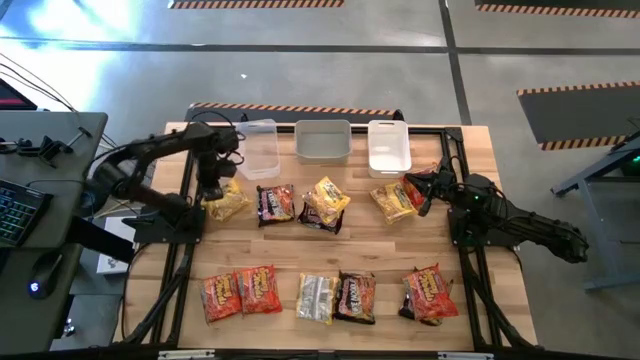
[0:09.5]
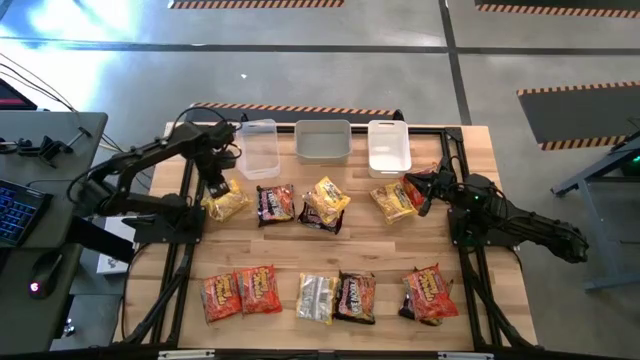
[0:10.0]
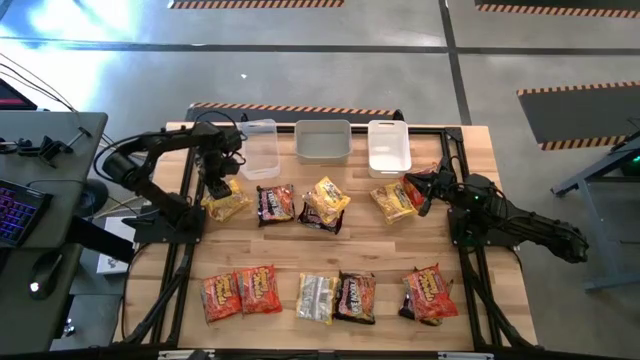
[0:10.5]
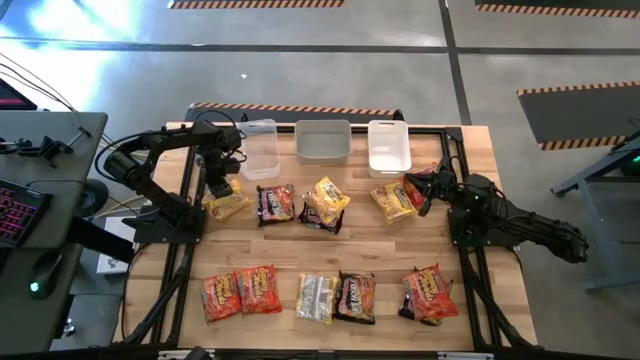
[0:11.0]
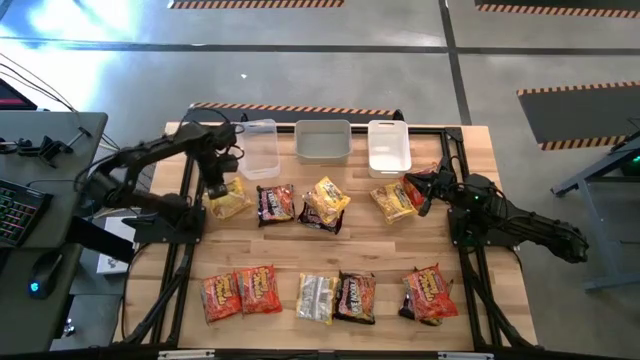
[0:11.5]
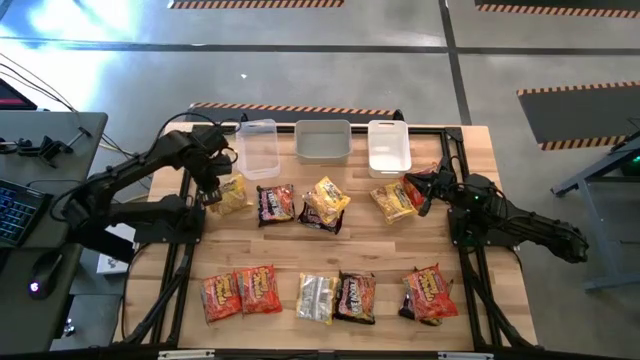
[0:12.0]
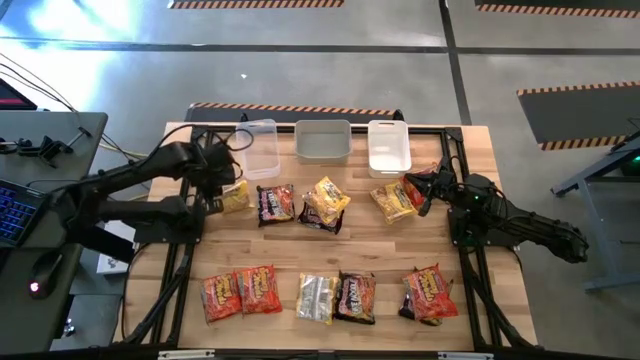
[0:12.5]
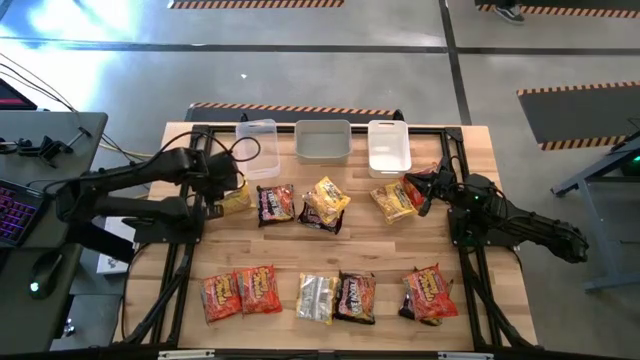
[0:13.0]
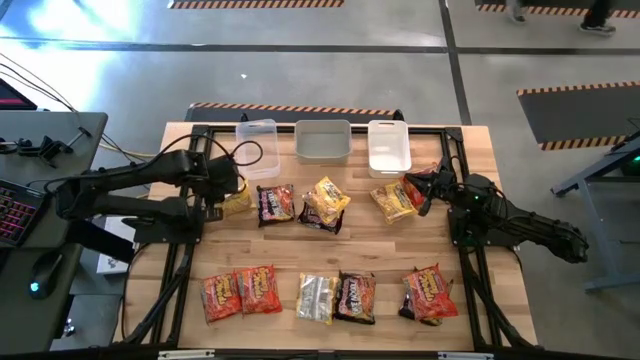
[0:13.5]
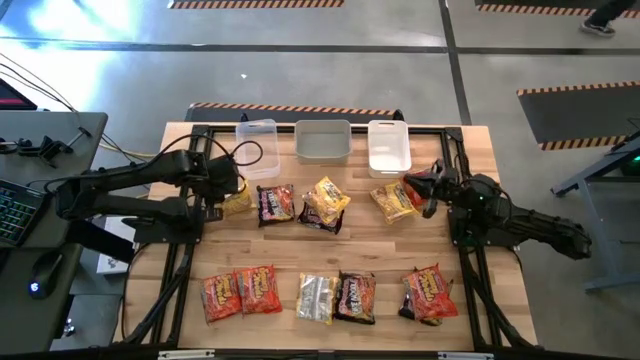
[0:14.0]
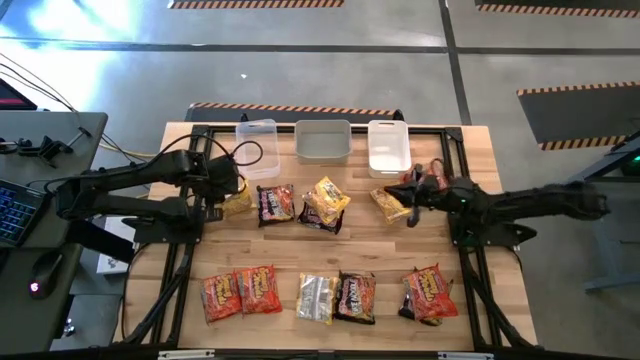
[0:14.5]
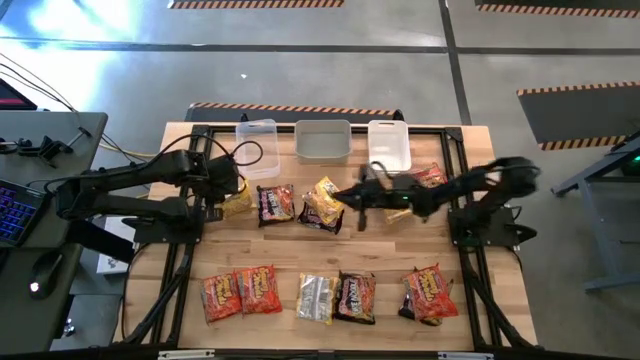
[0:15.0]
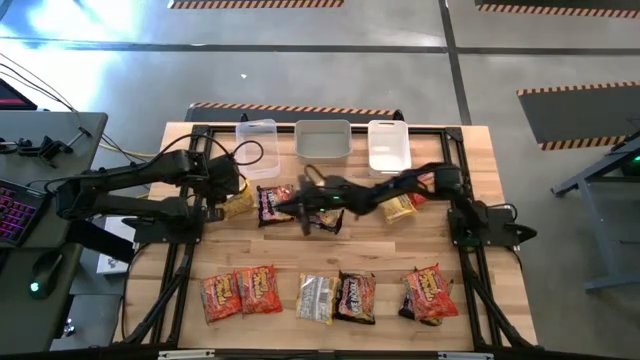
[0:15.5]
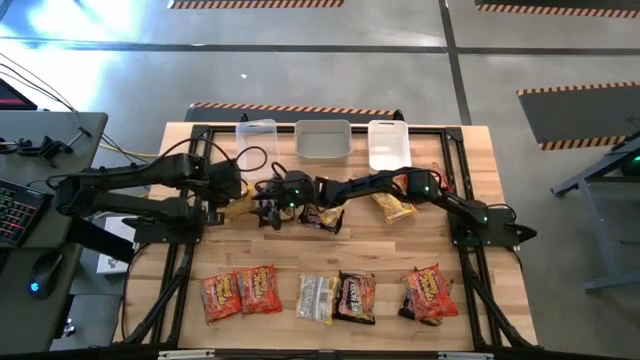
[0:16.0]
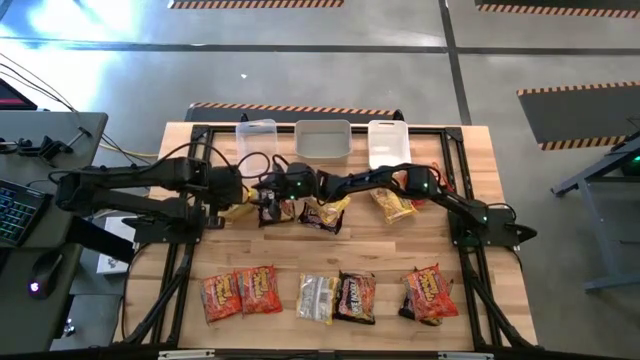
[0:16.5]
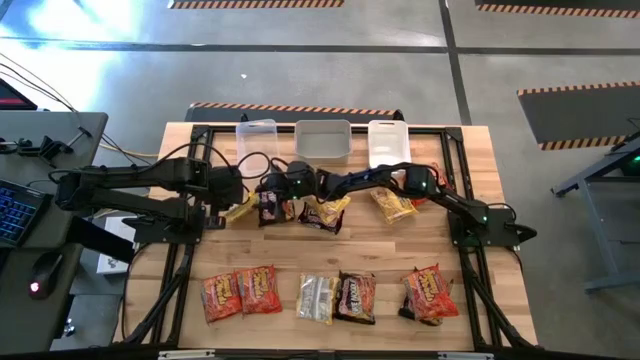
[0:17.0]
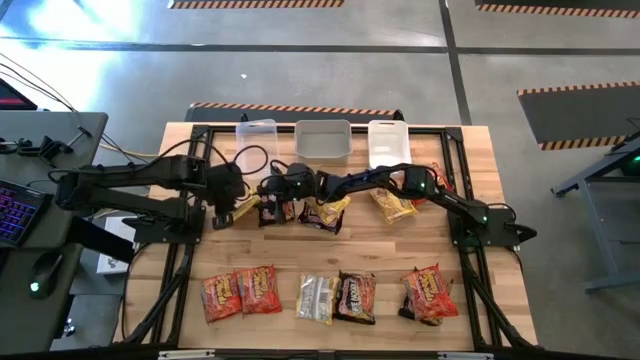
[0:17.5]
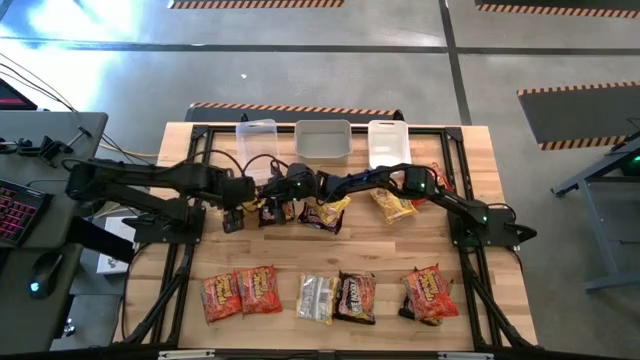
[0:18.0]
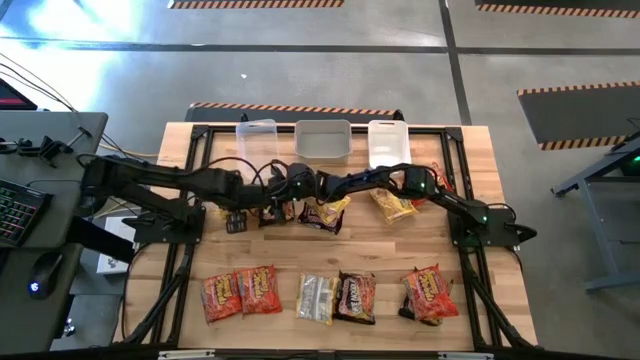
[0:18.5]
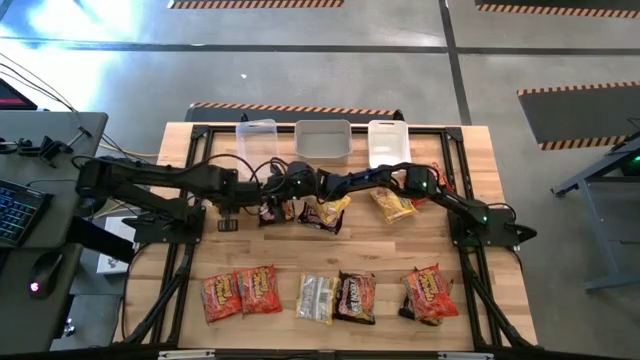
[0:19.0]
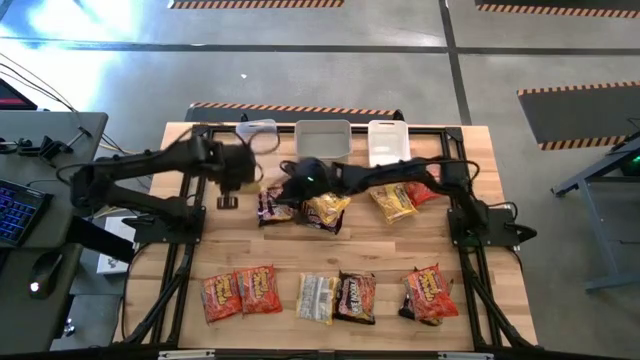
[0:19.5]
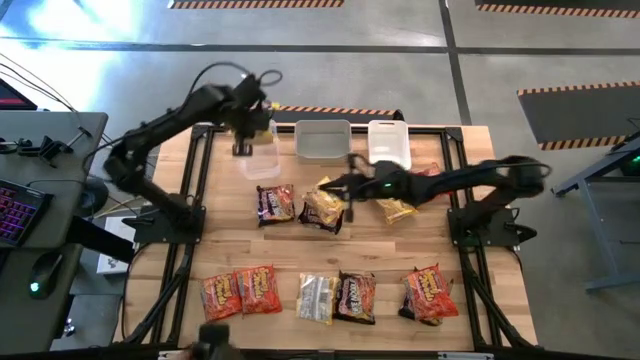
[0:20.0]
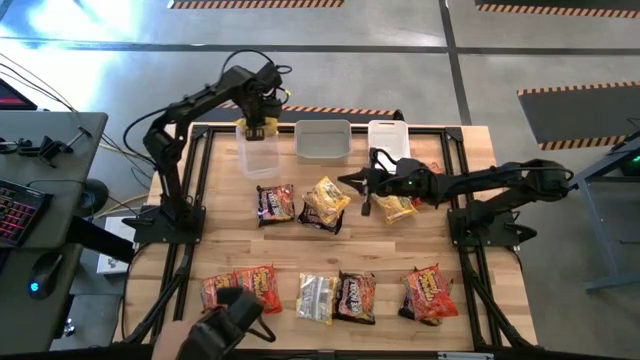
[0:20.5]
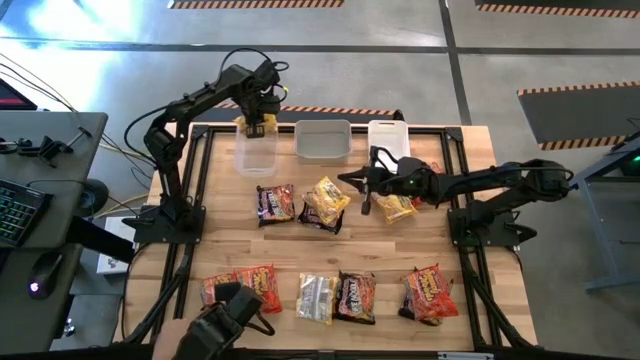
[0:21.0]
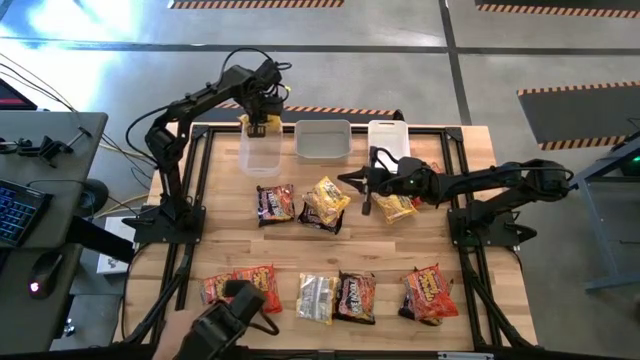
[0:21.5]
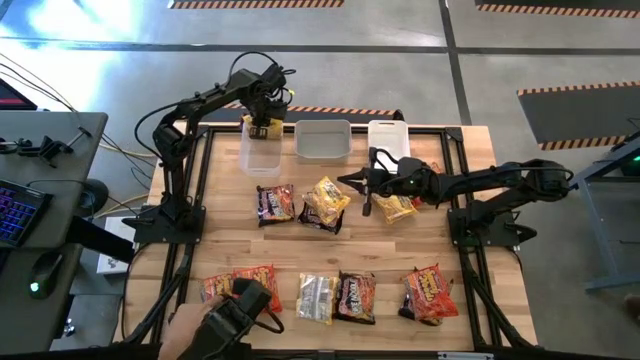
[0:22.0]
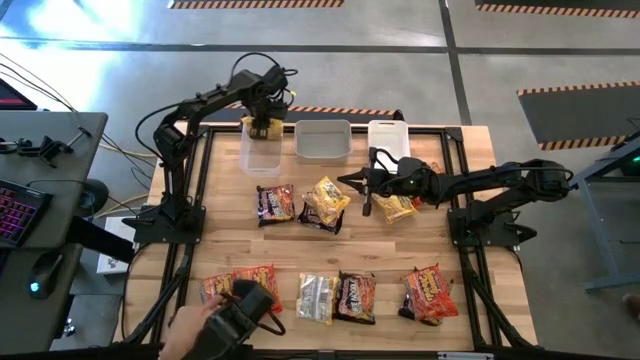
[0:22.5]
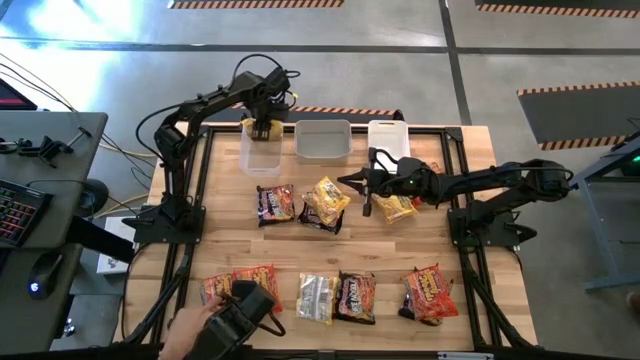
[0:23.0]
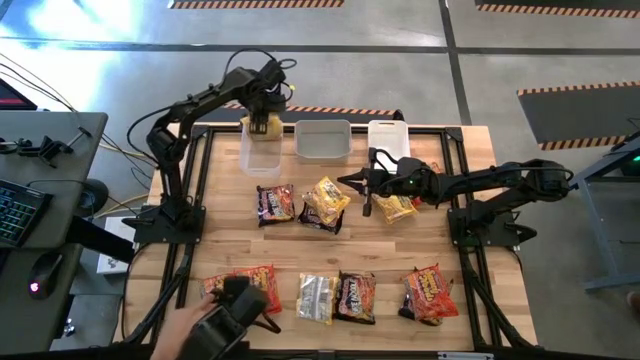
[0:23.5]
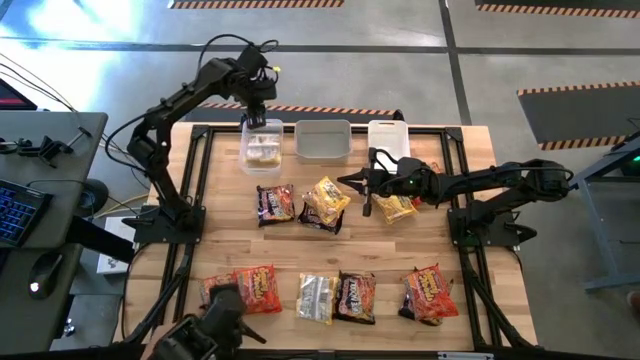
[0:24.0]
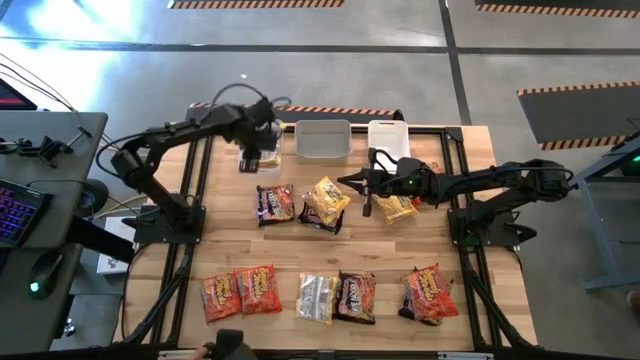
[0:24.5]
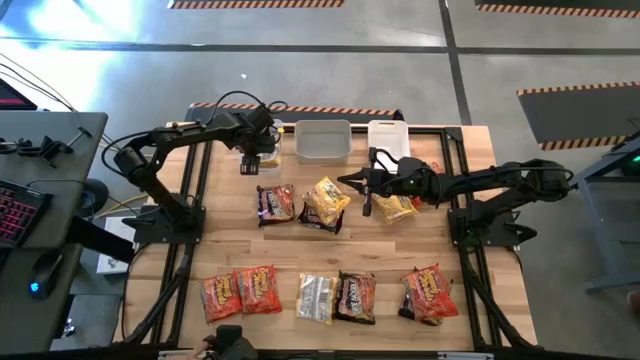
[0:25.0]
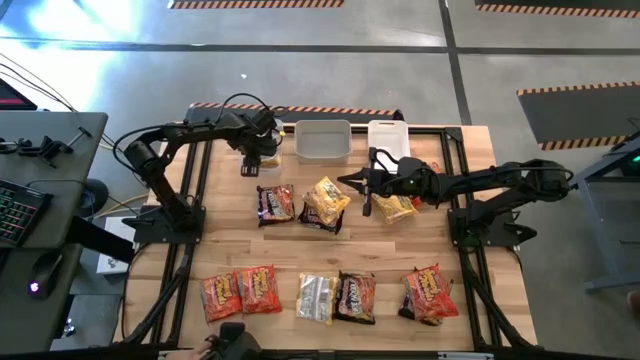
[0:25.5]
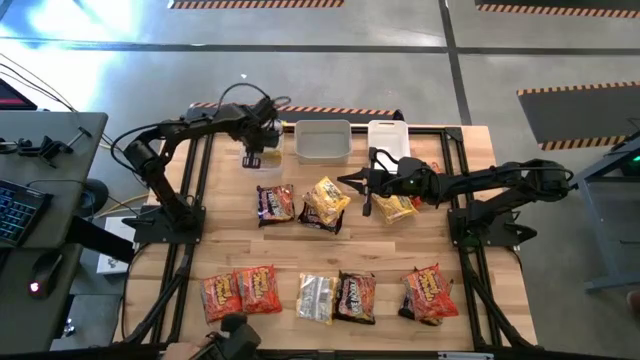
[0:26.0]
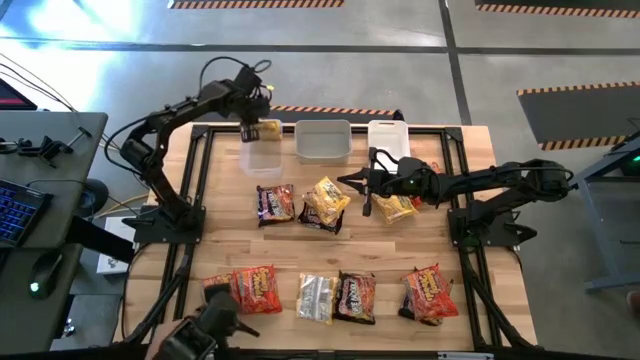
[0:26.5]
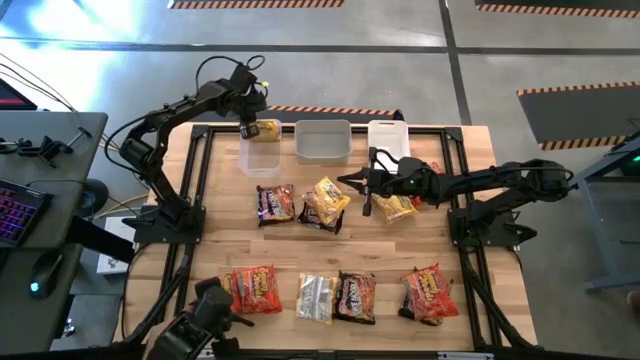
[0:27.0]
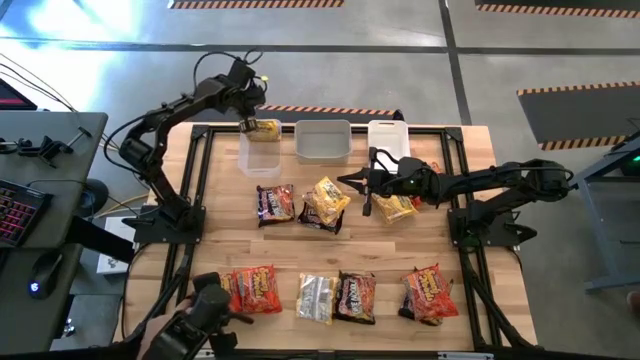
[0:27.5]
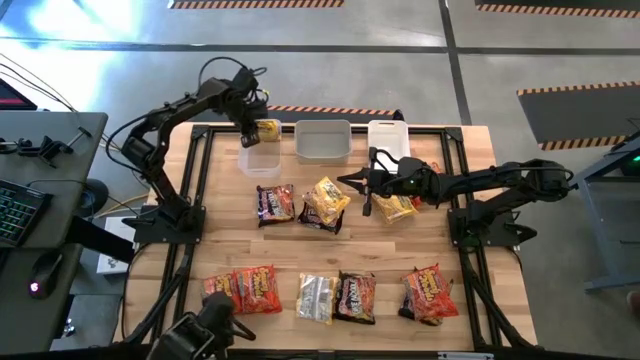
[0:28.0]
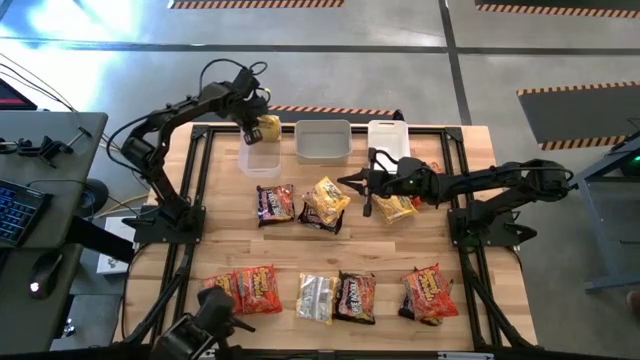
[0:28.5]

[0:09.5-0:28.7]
Task: Sort Maruchan noodles
Put the yellow noodle pack into the transparent bin

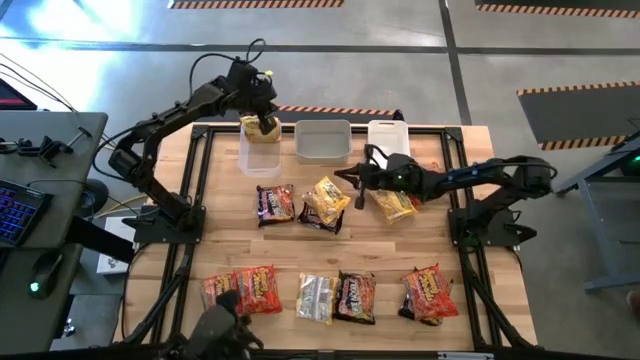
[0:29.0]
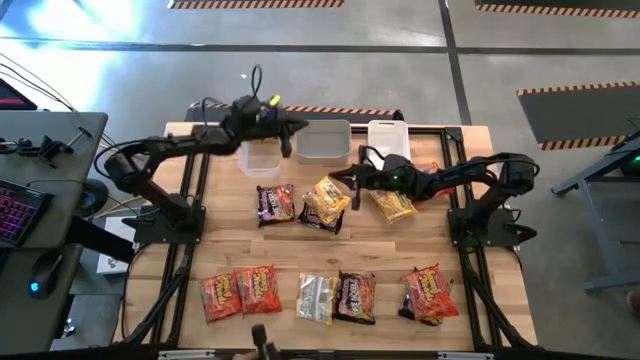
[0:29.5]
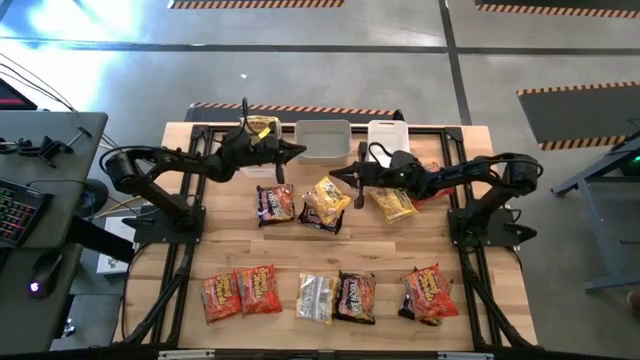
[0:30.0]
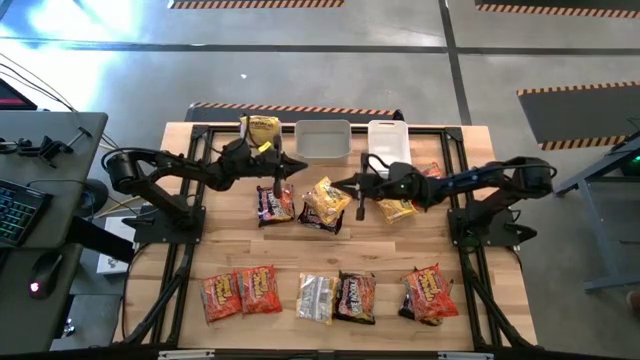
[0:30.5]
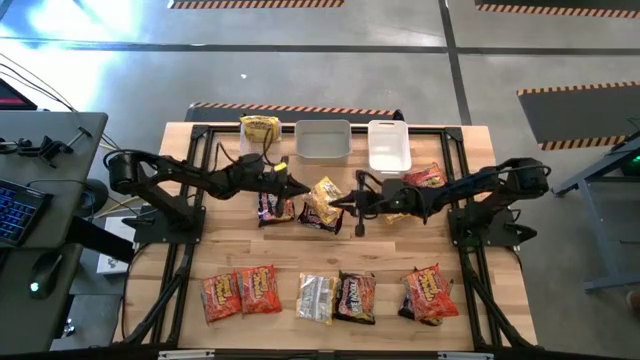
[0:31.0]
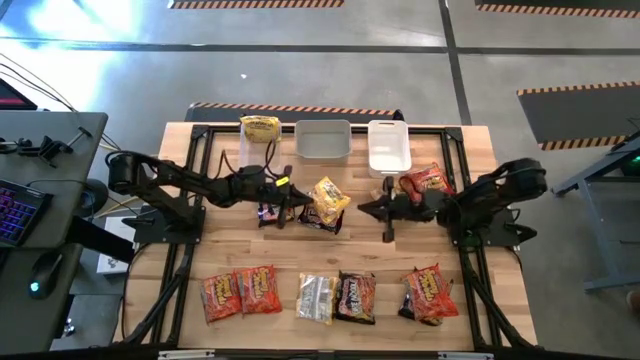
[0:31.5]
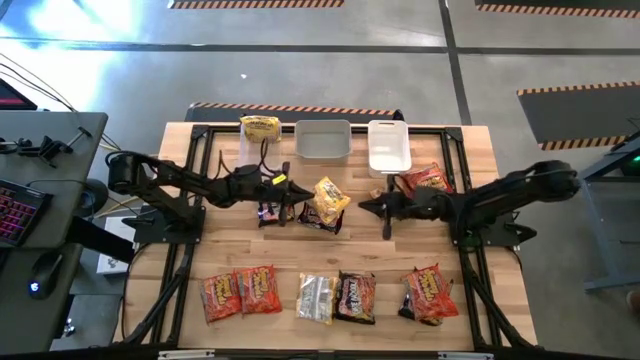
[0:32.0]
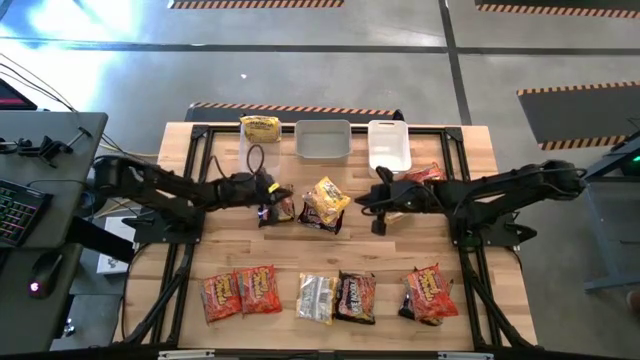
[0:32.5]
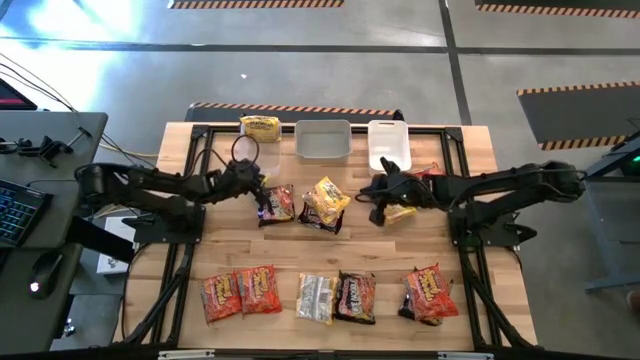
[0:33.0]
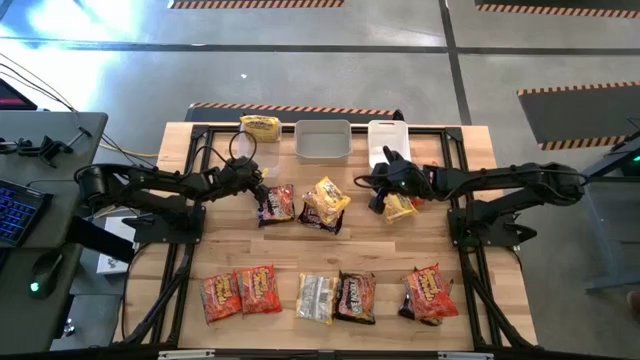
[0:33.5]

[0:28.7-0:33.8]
Adjust the transparent bin on the table
